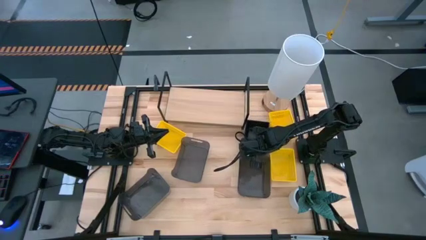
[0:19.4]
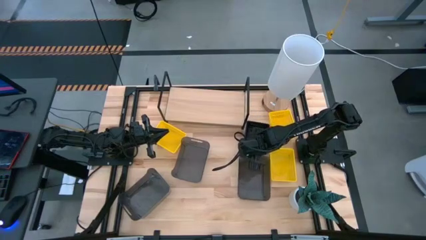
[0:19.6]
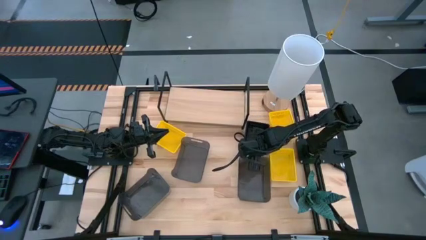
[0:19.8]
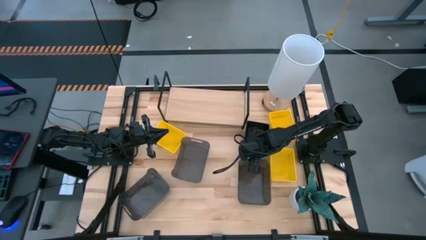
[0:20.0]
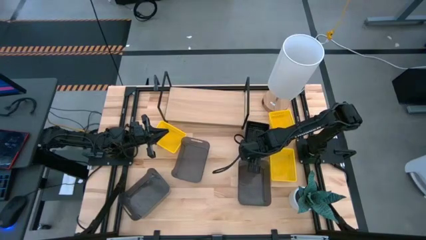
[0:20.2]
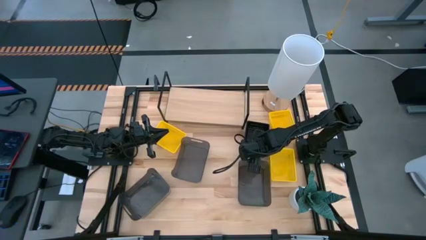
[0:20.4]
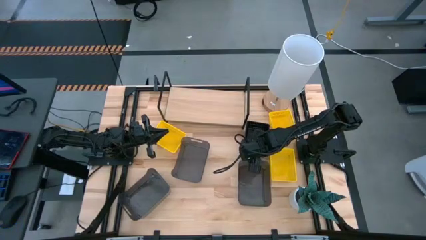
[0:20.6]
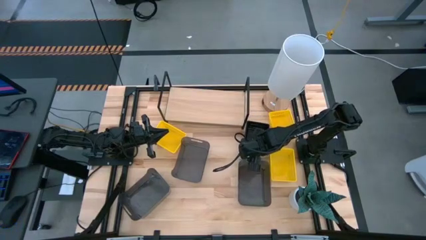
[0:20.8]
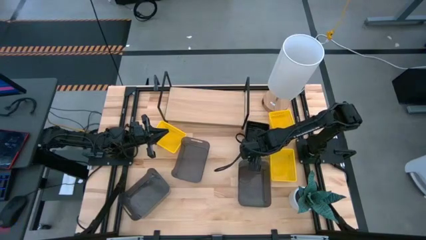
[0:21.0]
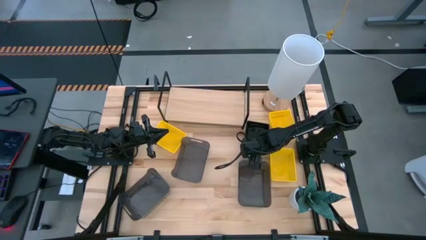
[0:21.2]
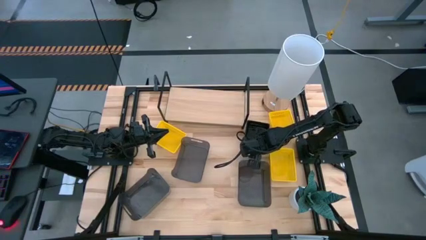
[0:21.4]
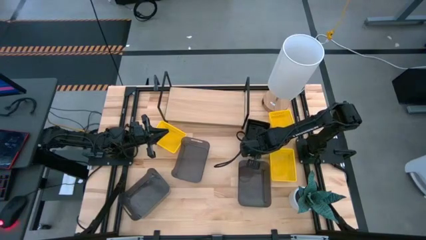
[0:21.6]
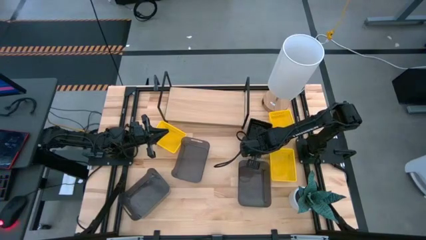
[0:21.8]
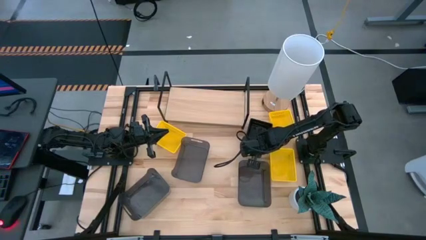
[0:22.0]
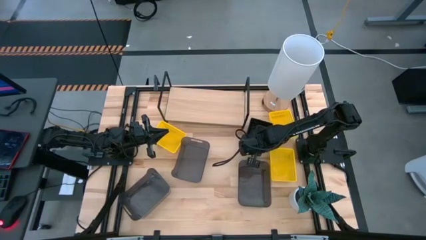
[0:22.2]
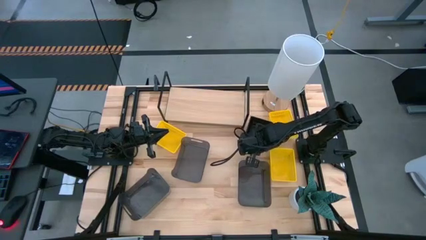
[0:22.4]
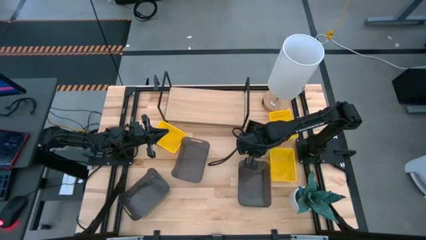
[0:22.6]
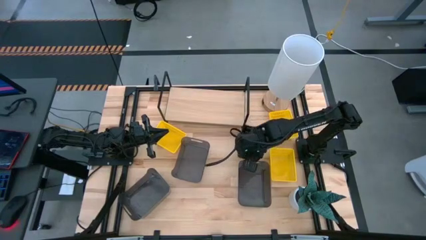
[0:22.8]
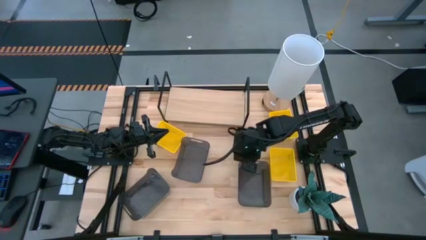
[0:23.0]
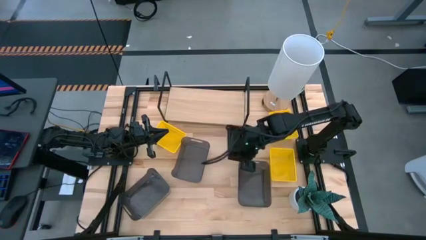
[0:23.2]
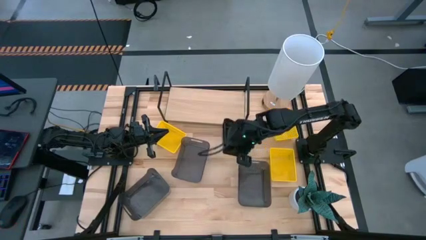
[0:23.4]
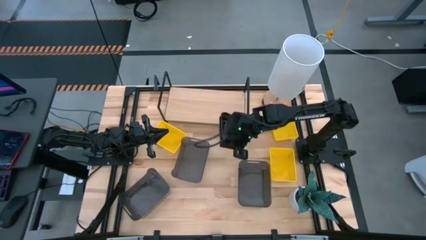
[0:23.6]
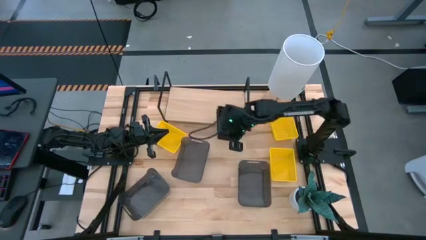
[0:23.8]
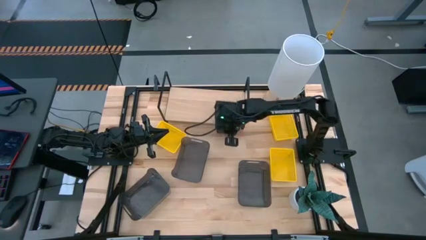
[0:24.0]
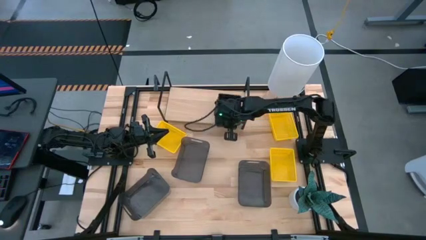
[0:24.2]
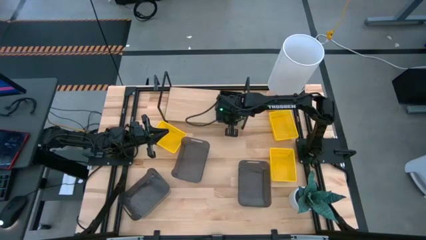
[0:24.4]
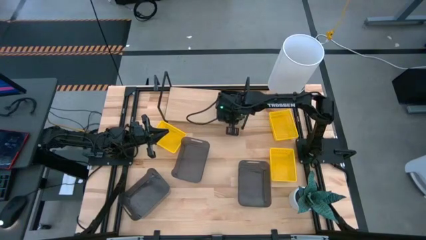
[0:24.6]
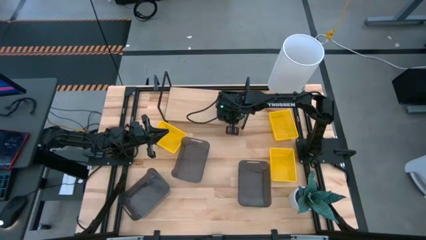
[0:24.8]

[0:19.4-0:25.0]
Task: Stack baskets on shelf by color
Put the stacked black bins on the shelf

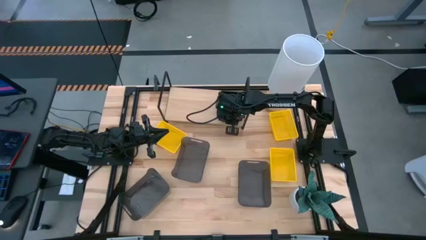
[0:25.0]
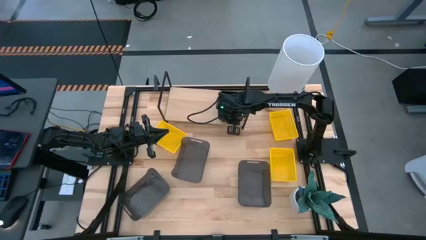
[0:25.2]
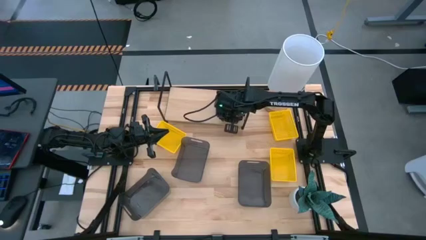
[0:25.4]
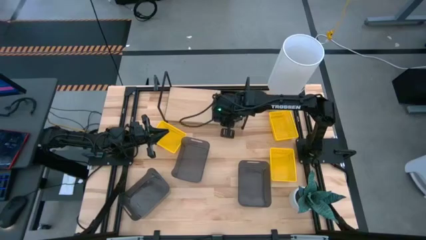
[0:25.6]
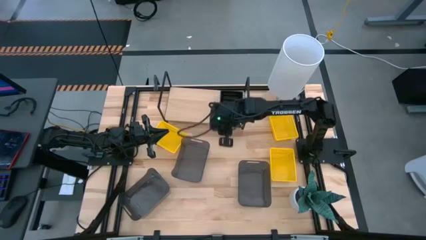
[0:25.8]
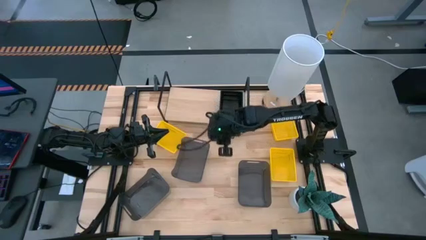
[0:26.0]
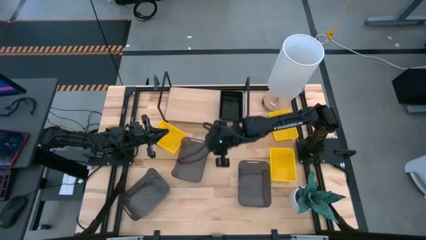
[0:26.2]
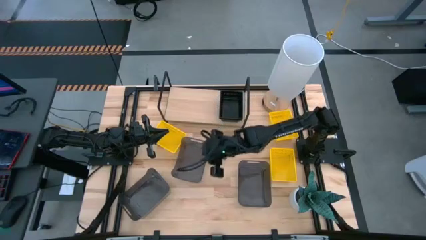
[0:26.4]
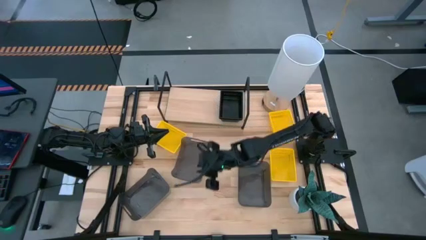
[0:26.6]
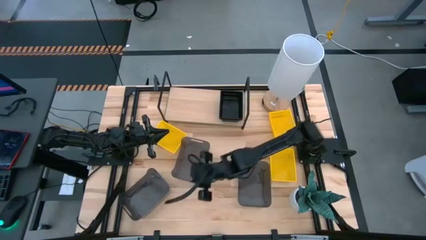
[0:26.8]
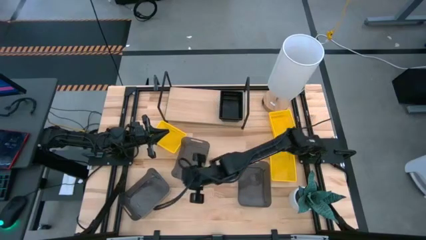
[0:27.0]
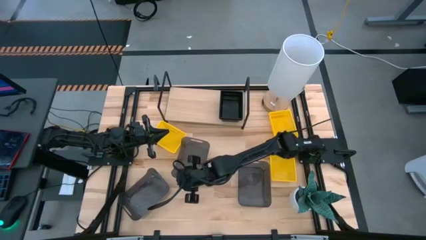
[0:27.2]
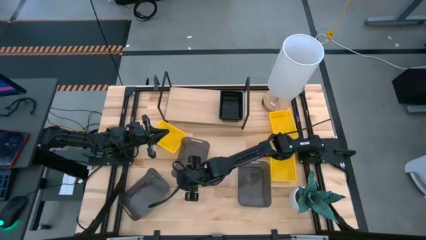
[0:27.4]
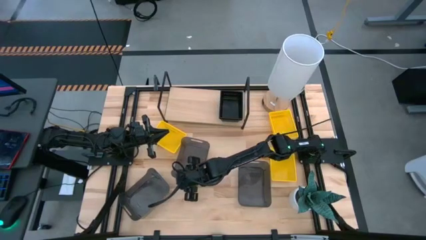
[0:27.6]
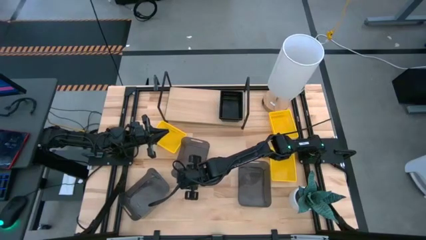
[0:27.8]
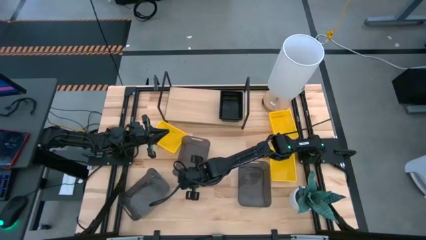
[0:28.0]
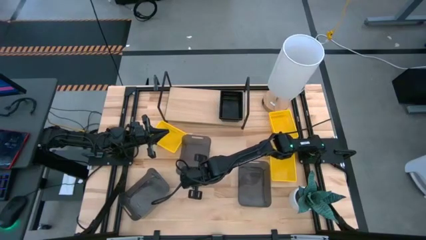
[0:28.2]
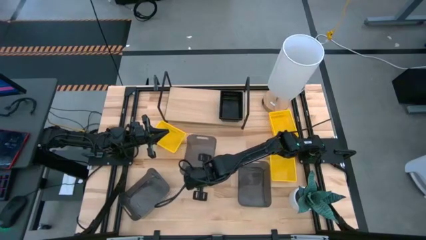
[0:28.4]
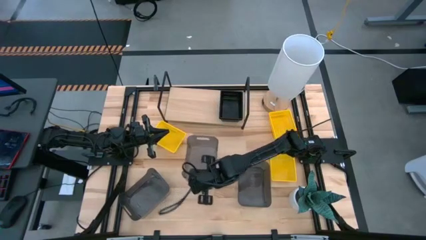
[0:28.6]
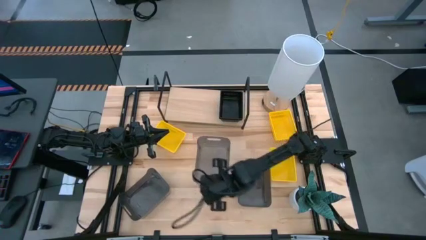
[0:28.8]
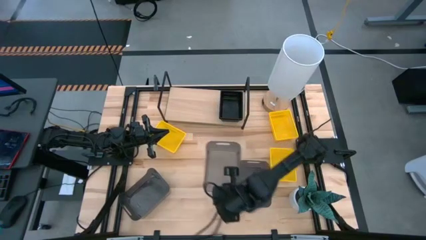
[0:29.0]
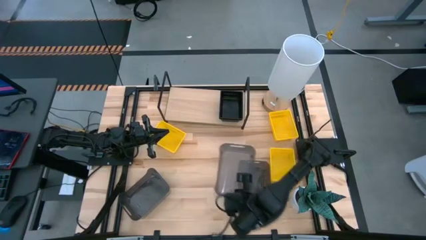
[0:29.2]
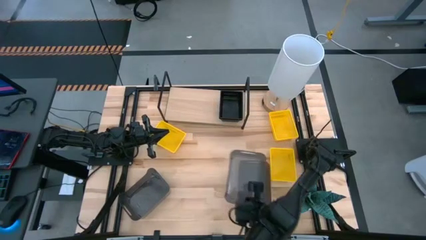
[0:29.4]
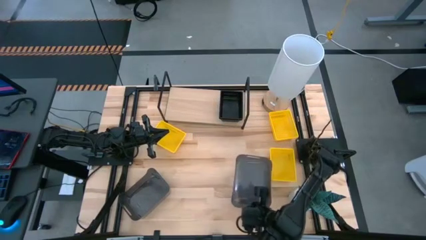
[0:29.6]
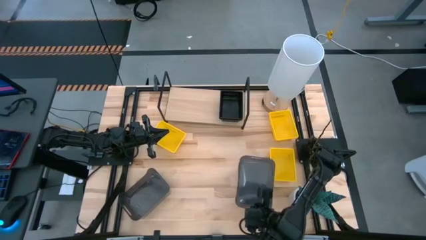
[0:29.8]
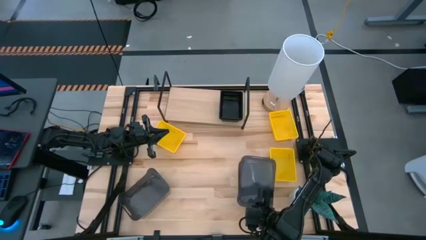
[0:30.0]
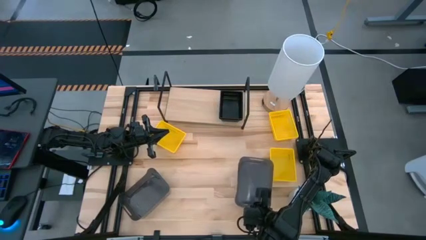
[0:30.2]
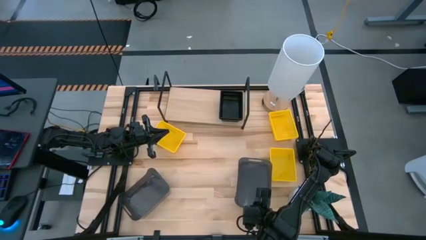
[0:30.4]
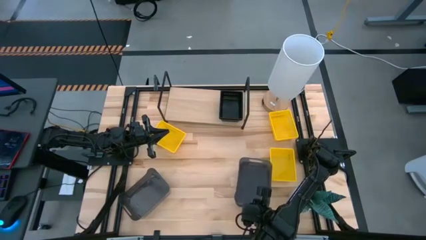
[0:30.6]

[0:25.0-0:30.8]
Stack the light black bin on the top of the light black bin
